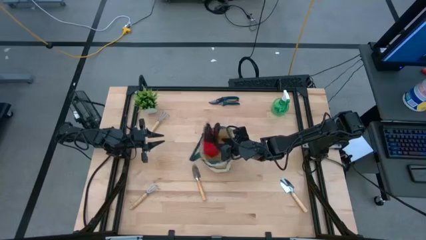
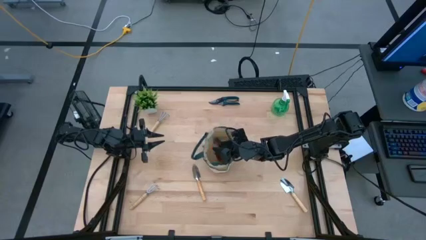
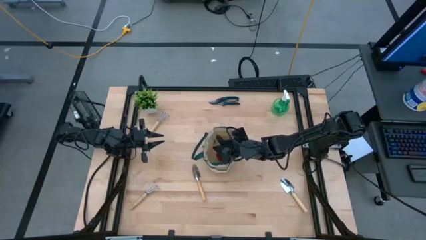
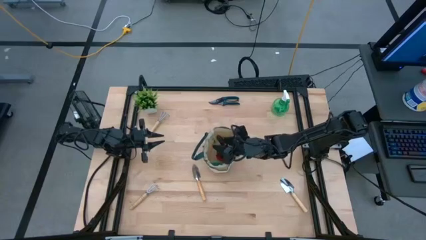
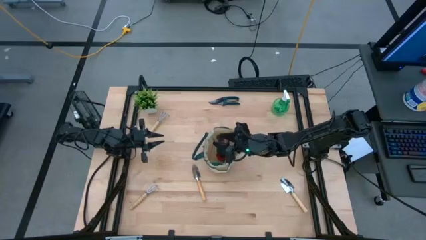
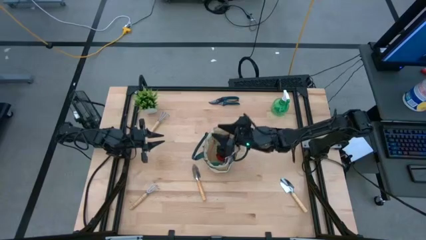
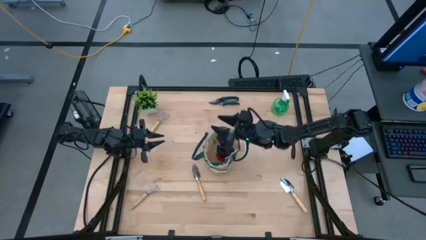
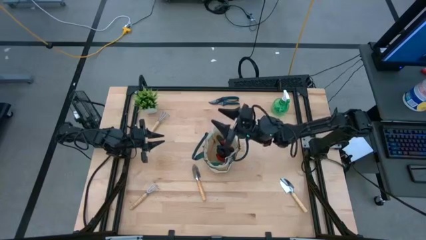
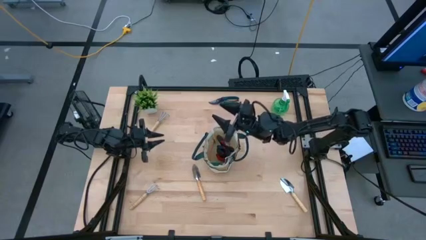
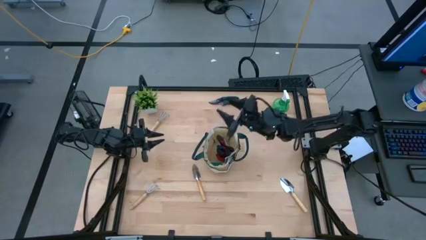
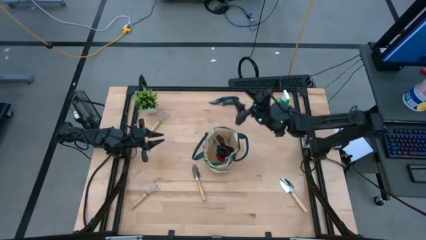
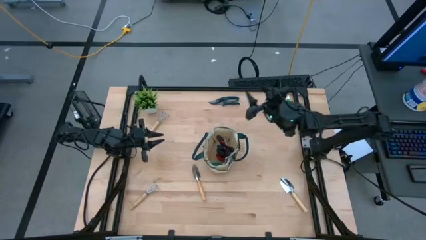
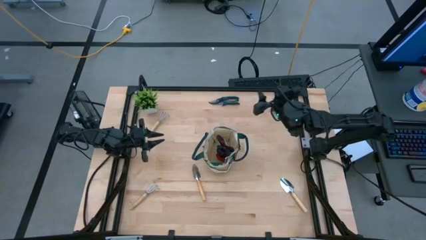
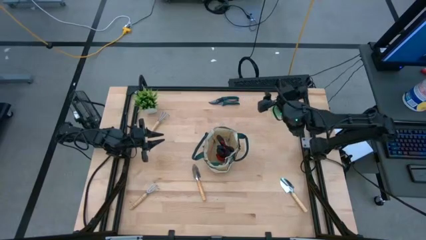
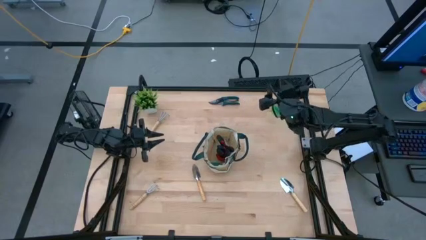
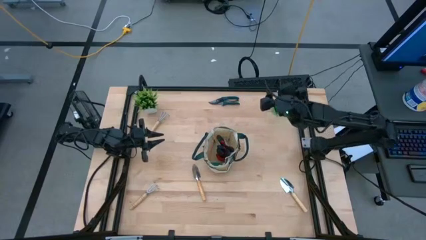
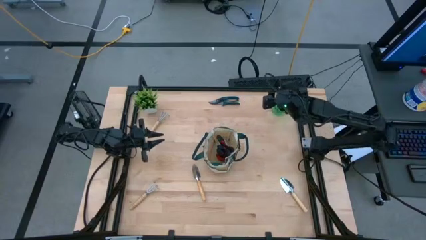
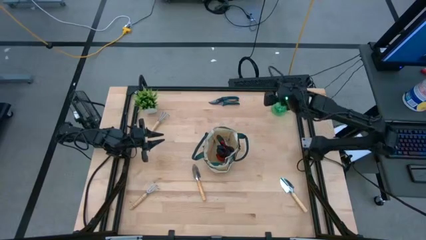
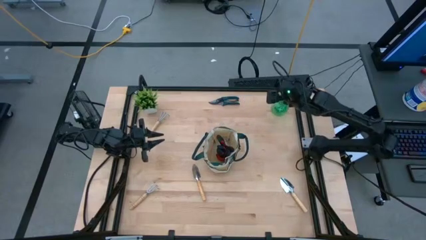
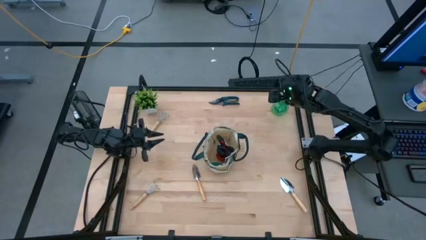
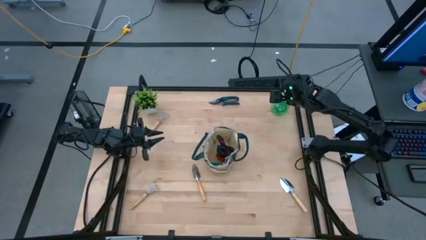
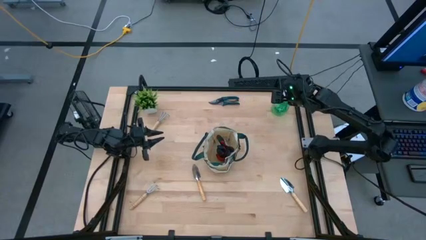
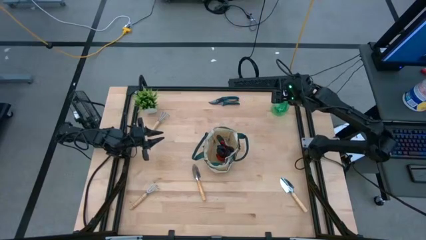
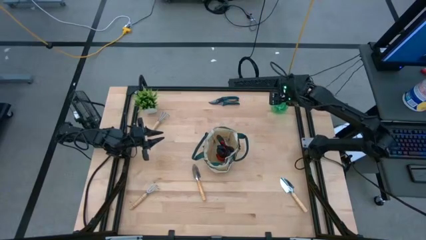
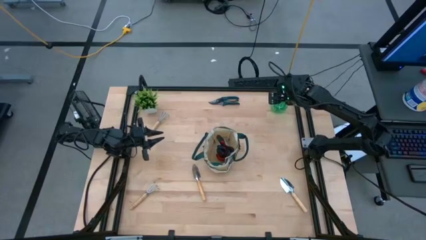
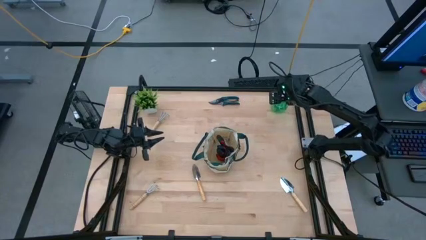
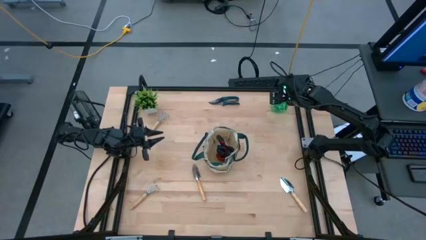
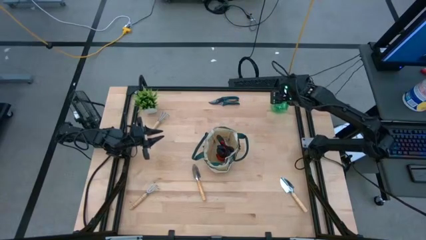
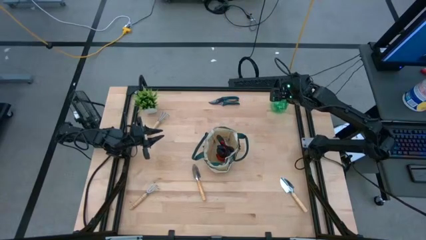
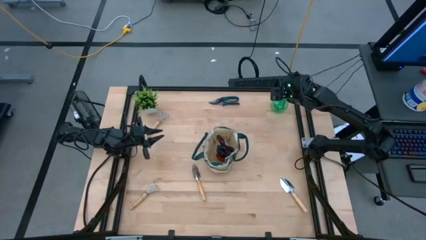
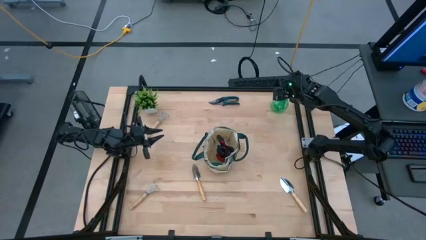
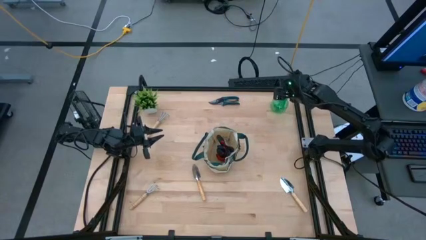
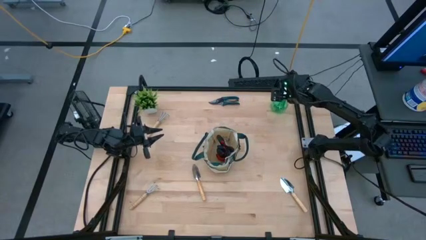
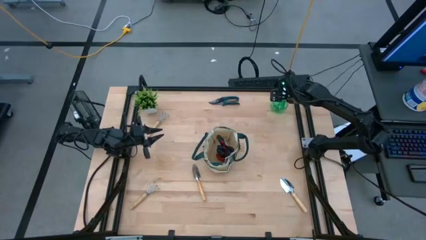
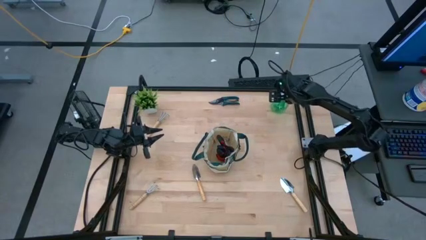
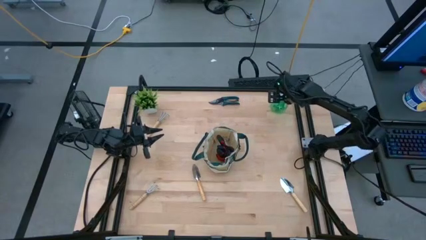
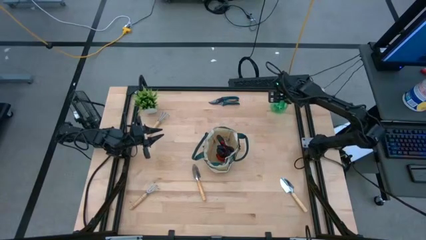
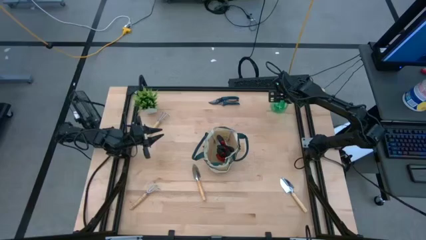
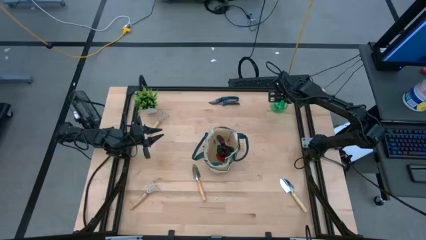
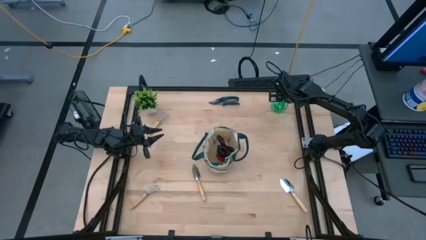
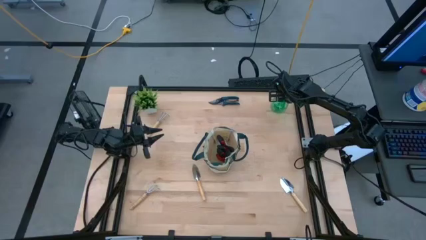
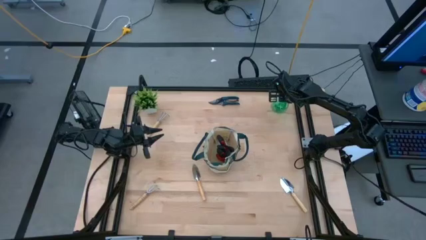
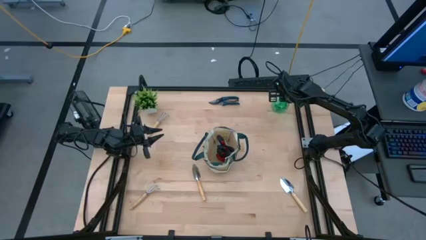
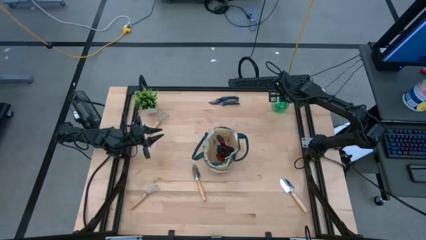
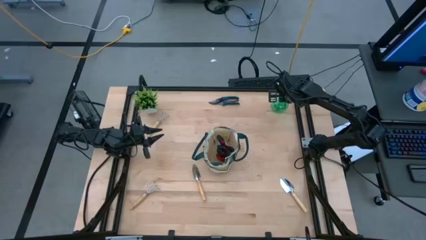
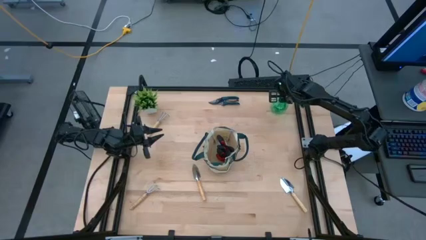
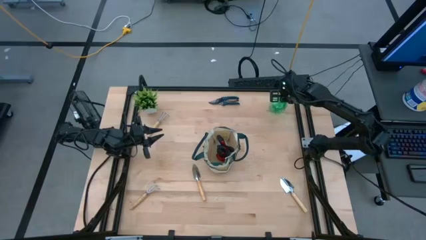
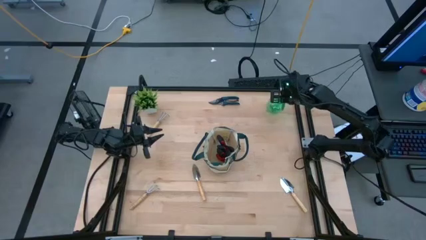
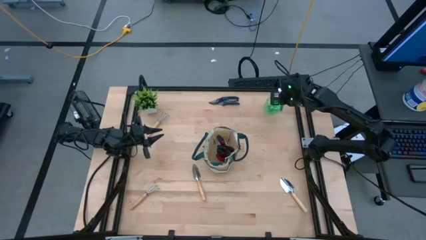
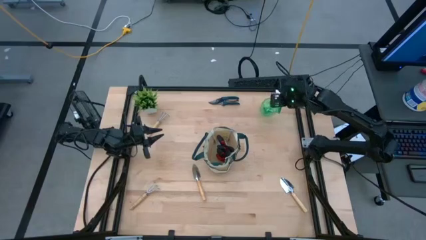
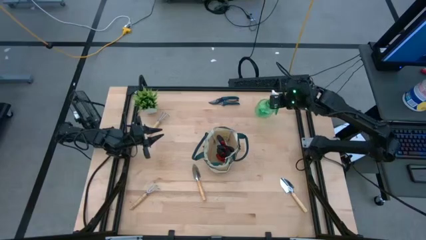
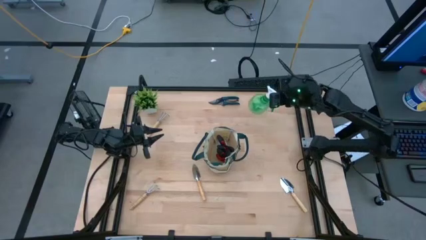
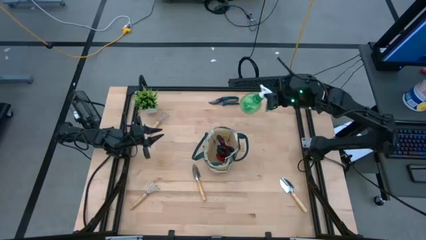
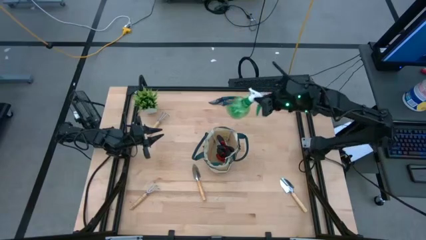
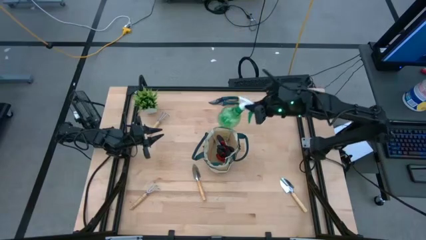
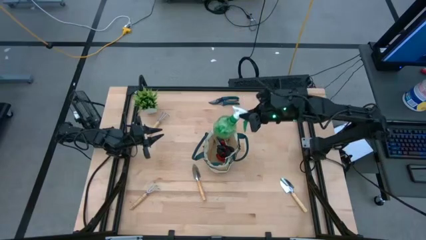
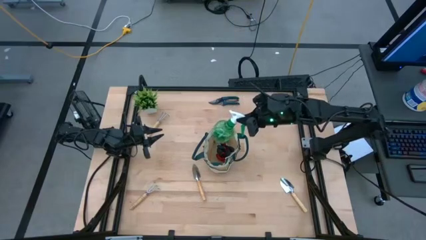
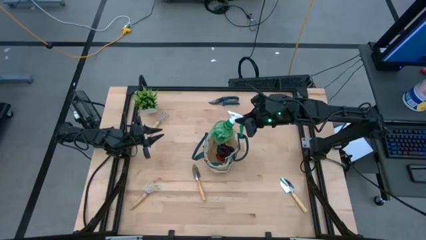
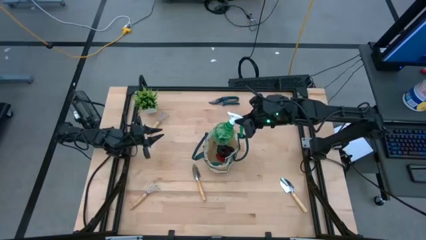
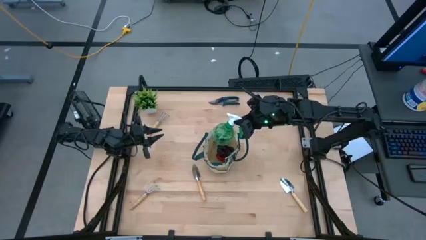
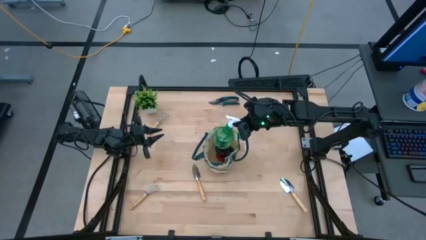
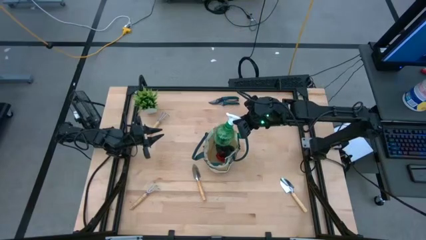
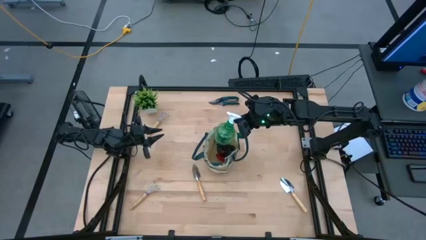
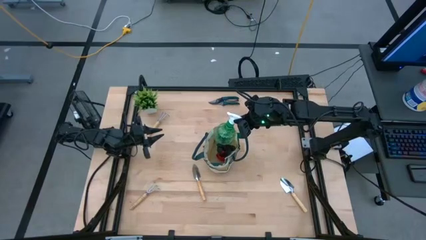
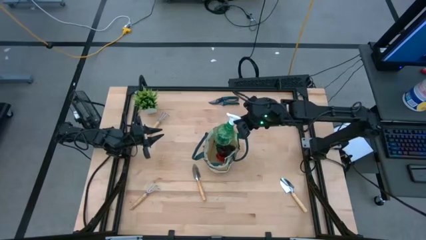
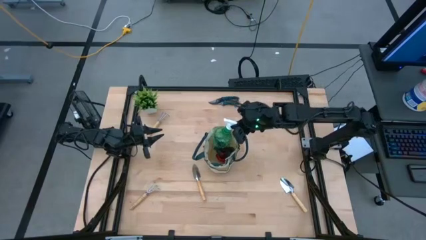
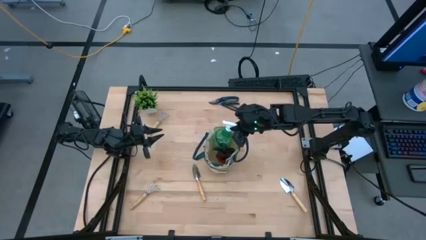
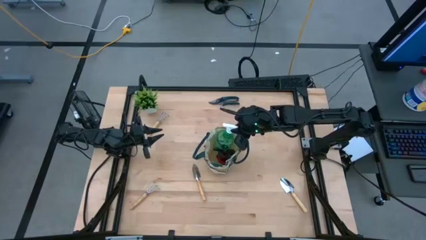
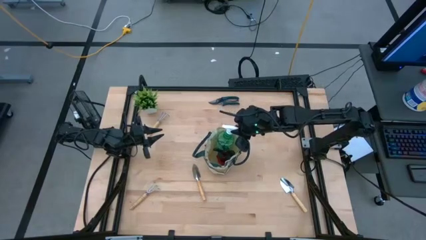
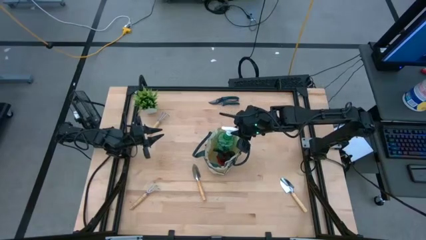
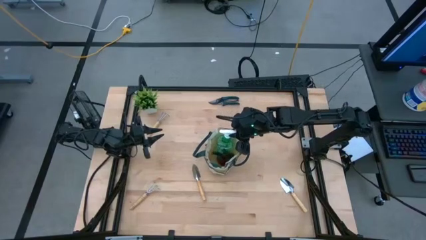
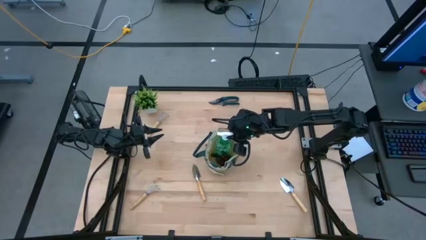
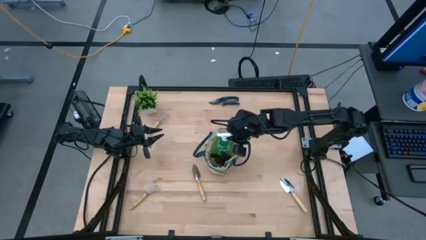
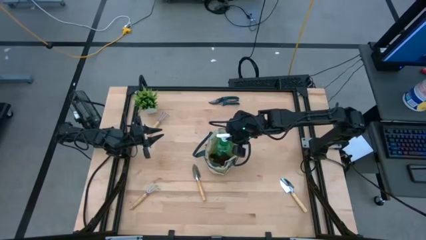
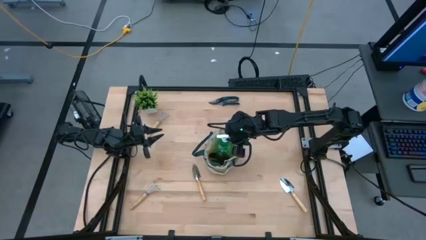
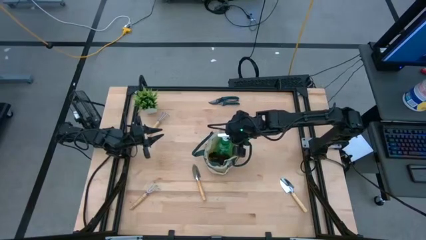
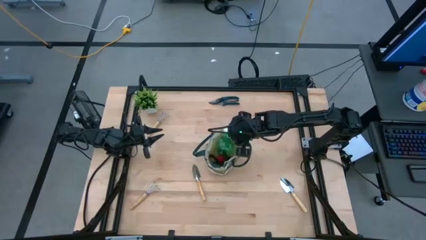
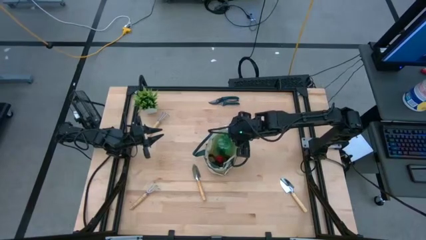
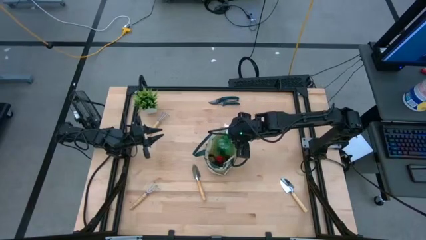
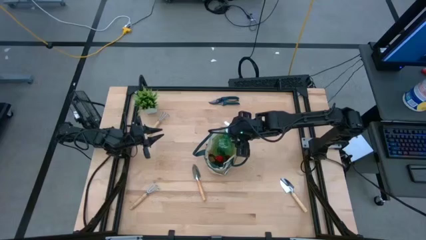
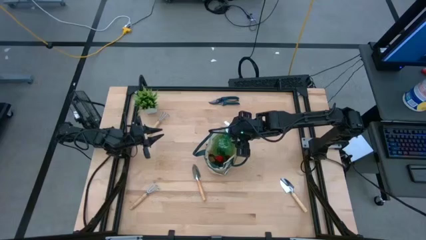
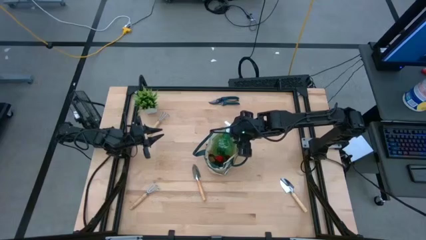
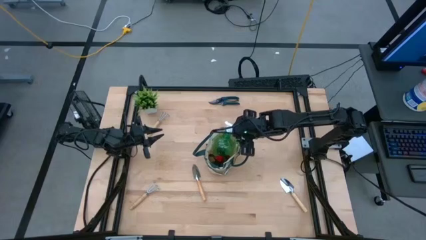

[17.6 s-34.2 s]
Task: Pick & Place Garden tools in Gardening bag
Put the green spray bottle into the gardening bag
